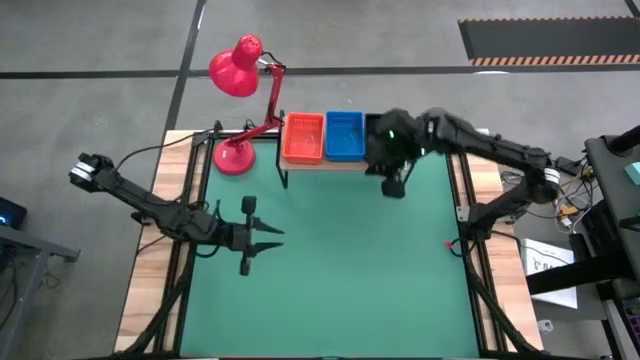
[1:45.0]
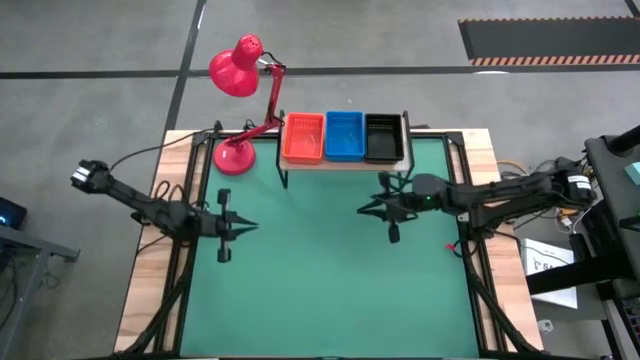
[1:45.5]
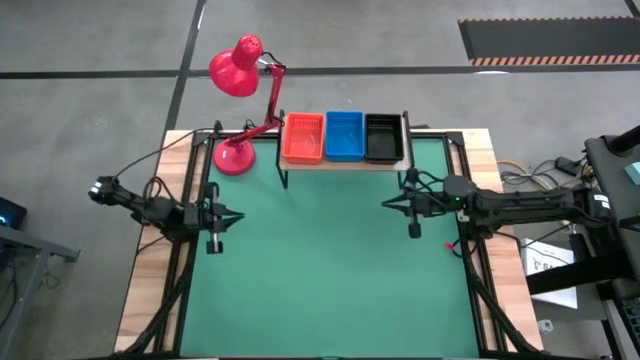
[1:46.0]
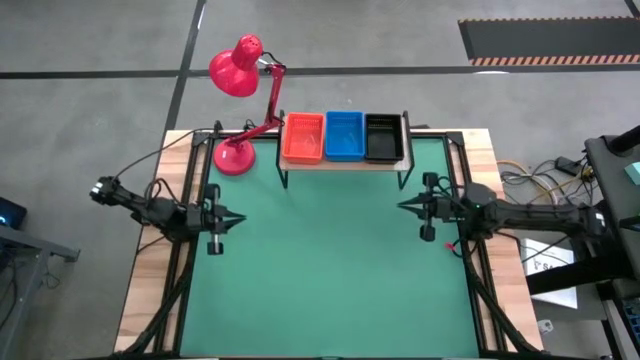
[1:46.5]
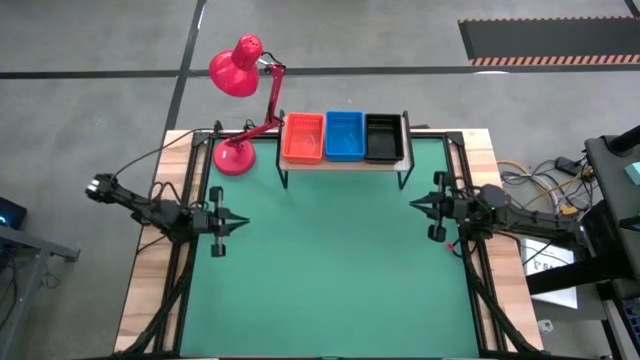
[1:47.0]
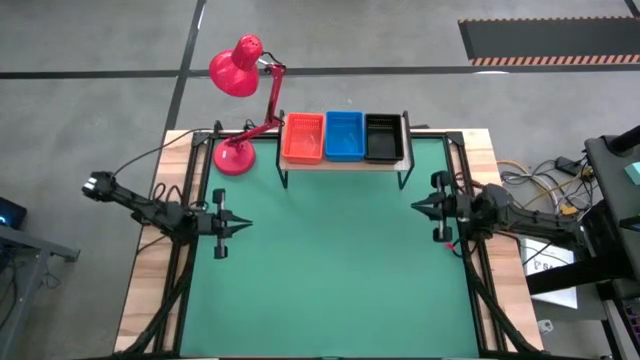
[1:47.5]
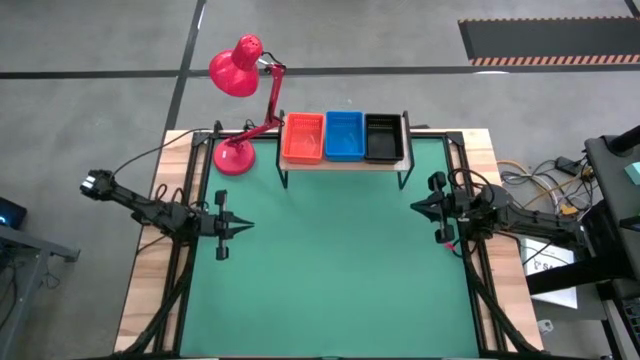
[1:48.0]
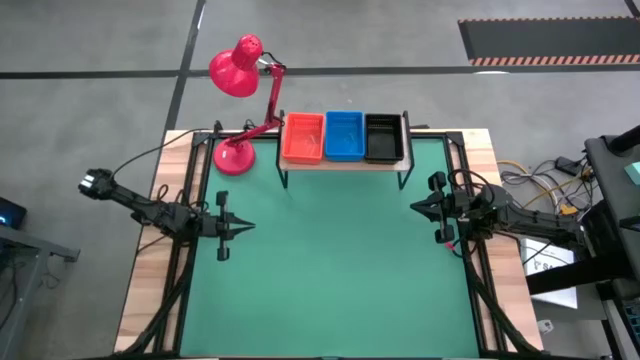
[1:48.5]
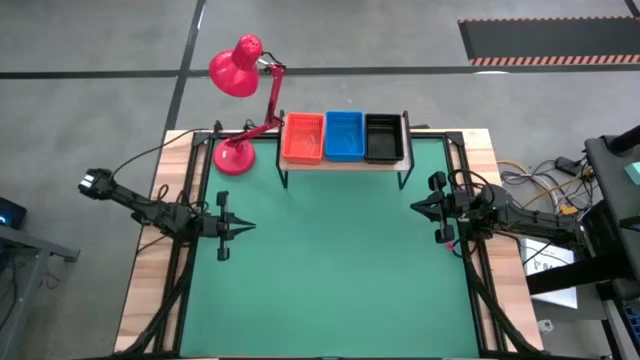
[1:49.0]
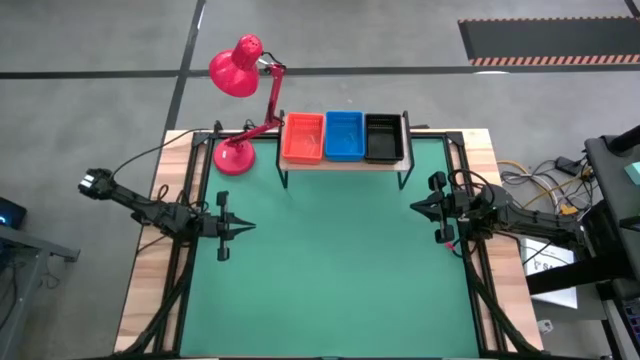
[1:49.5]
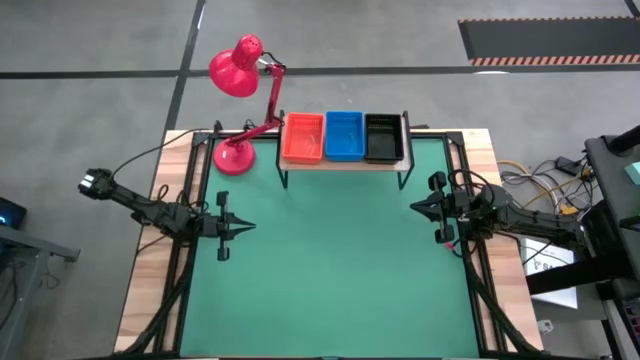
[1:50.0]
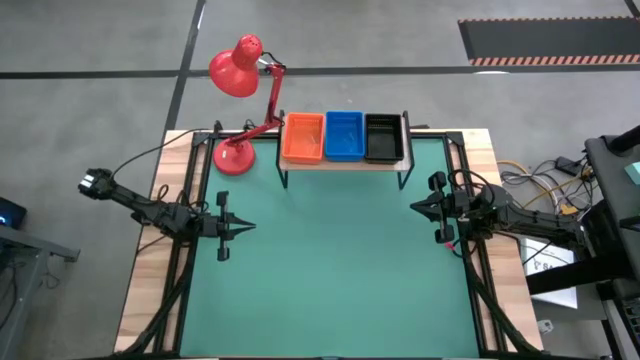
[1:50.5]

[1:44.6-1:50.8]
Task: Stack baskets on shelf by color
Return to Home Position

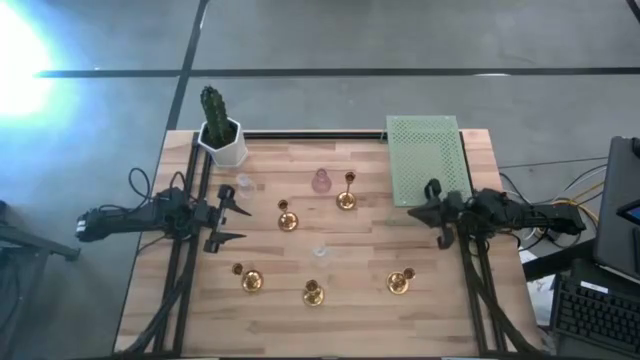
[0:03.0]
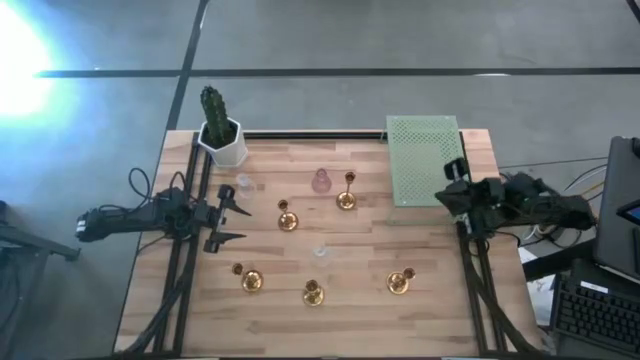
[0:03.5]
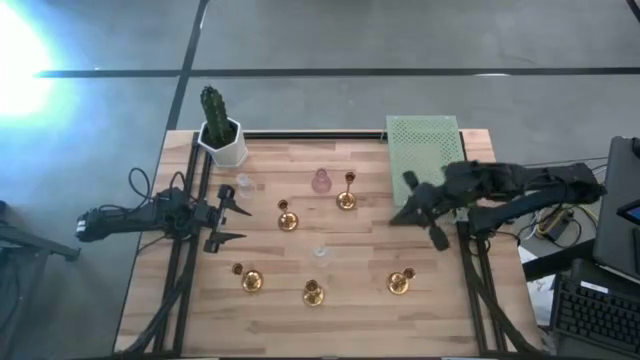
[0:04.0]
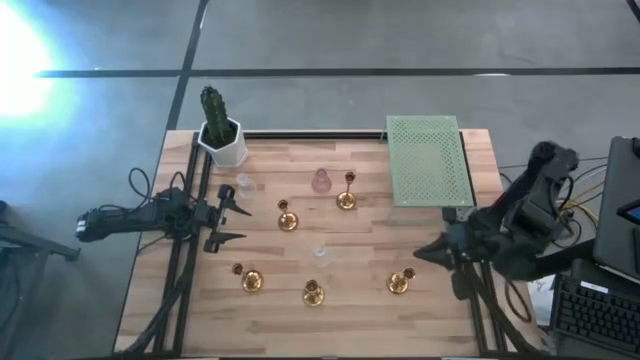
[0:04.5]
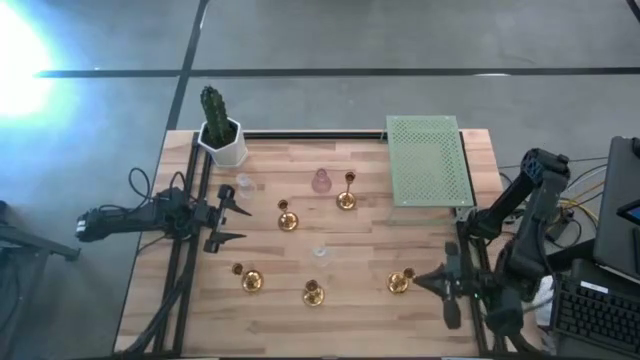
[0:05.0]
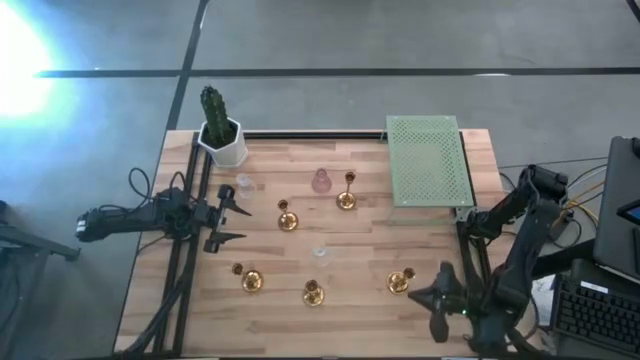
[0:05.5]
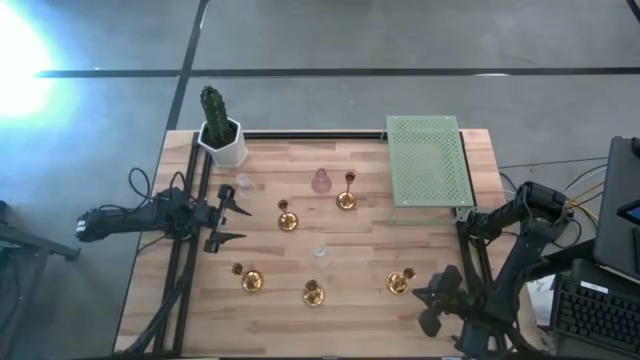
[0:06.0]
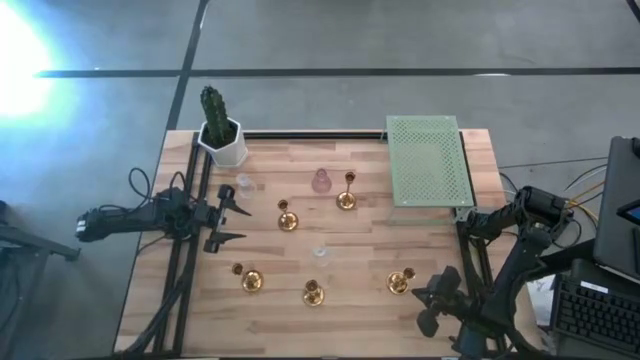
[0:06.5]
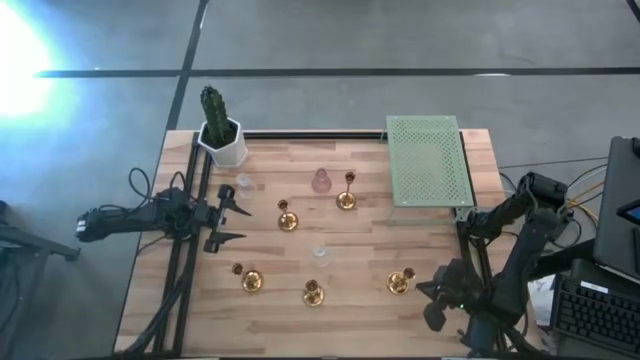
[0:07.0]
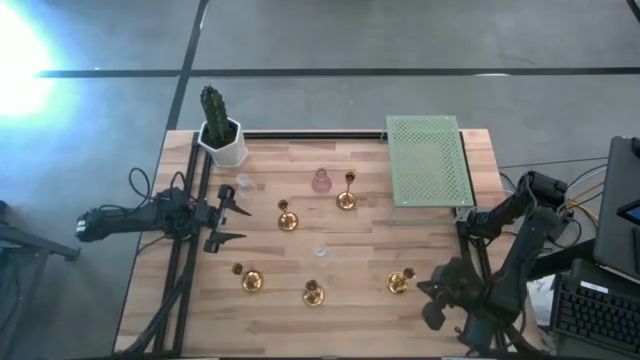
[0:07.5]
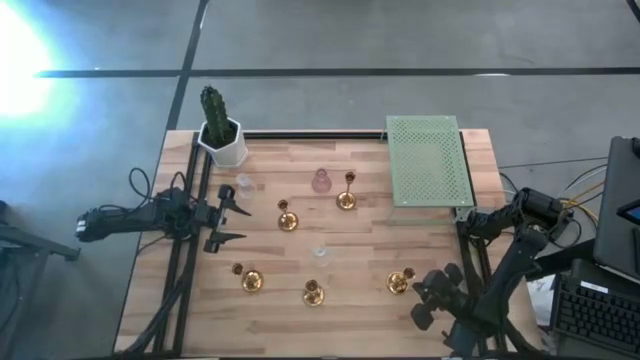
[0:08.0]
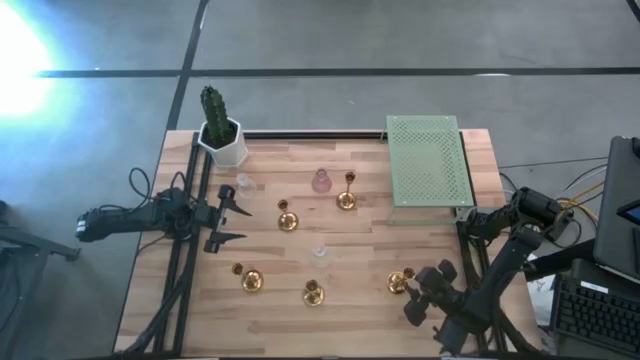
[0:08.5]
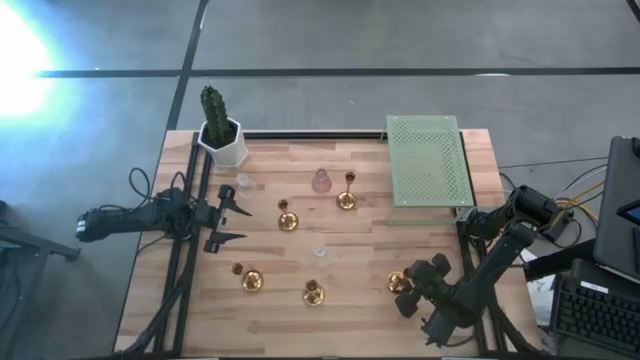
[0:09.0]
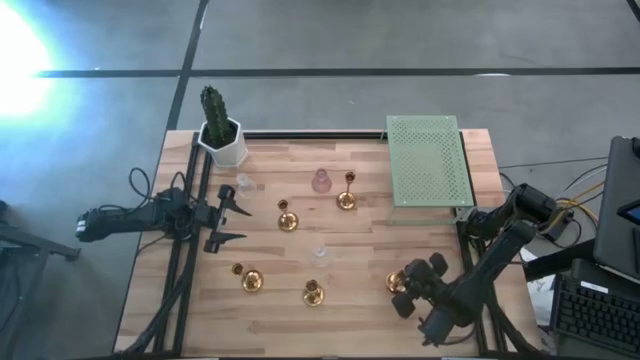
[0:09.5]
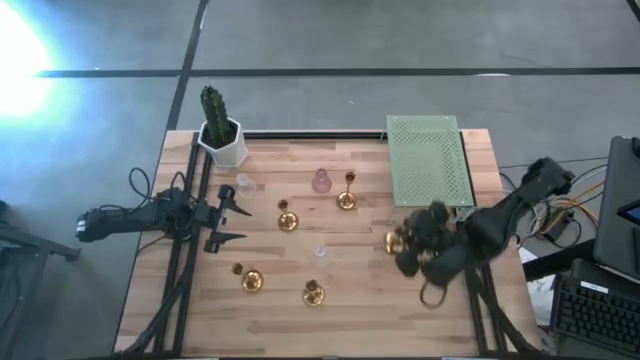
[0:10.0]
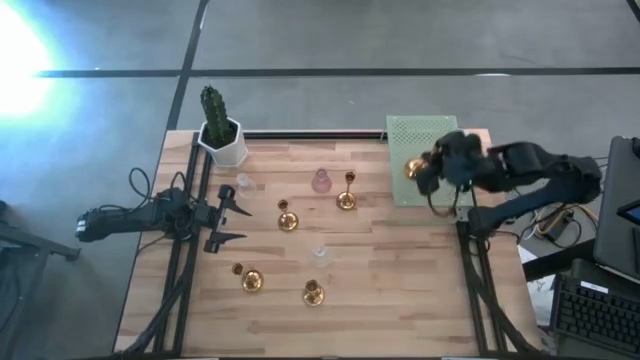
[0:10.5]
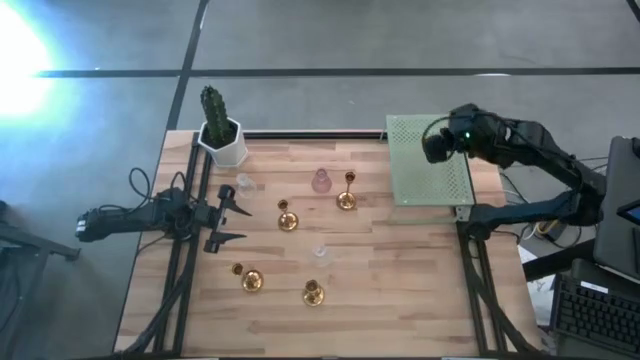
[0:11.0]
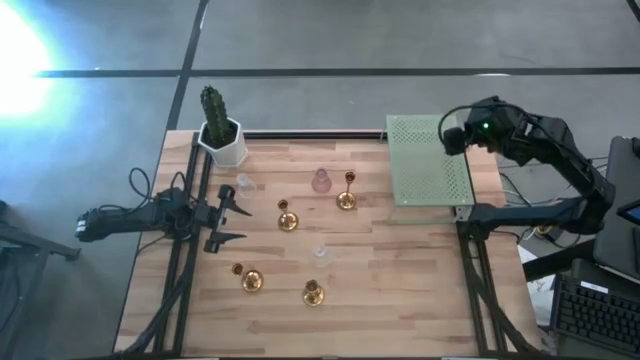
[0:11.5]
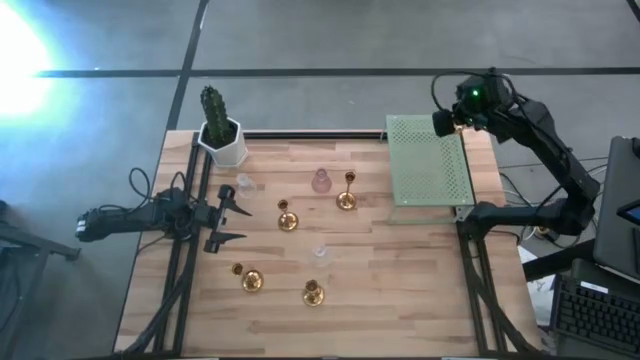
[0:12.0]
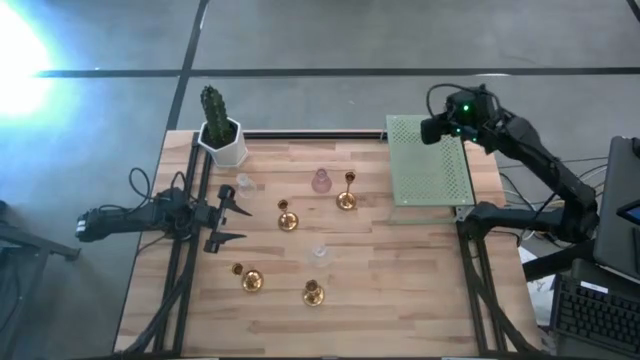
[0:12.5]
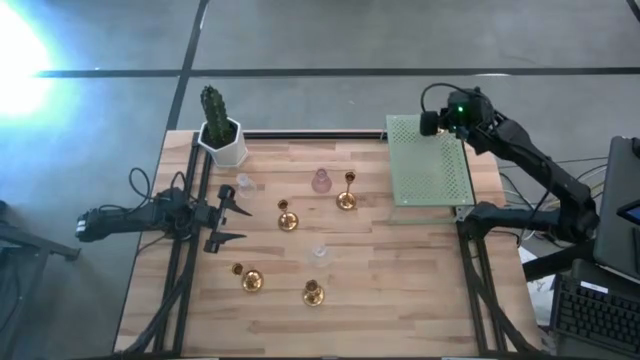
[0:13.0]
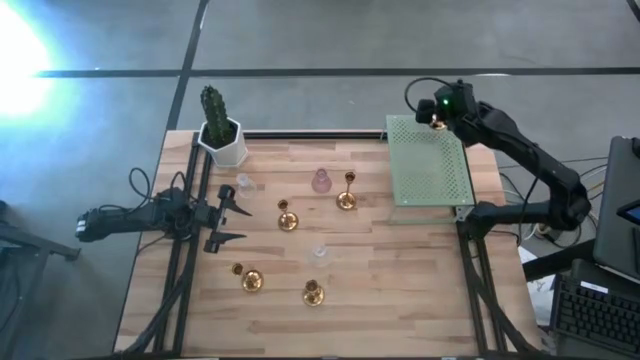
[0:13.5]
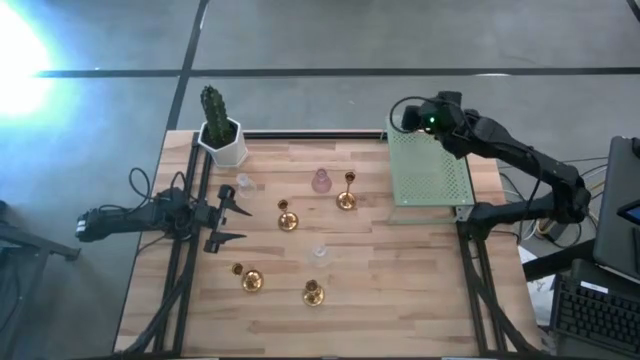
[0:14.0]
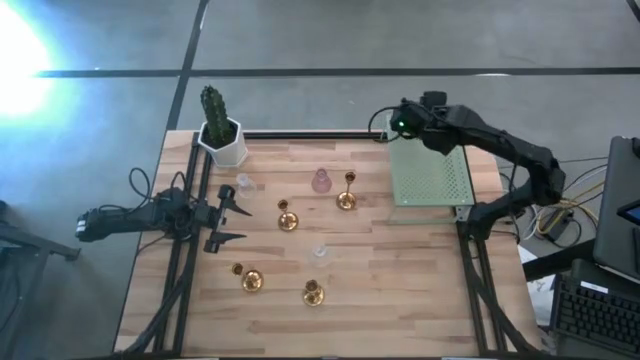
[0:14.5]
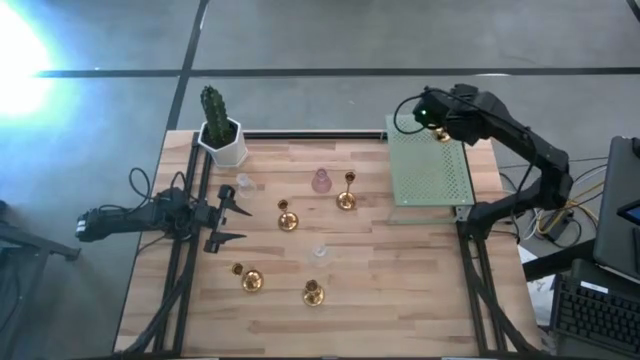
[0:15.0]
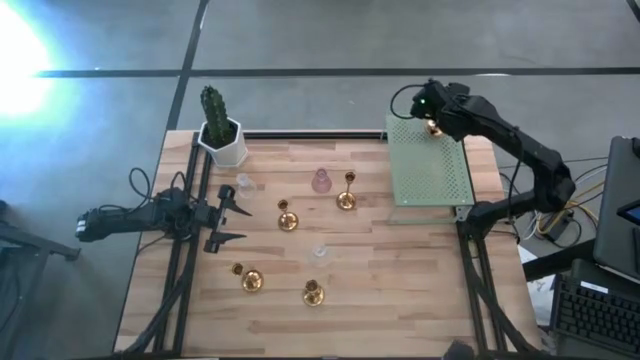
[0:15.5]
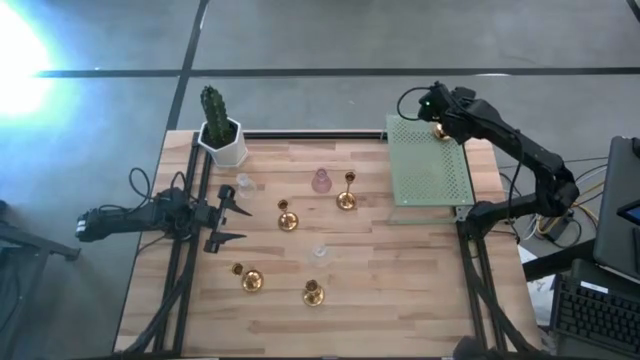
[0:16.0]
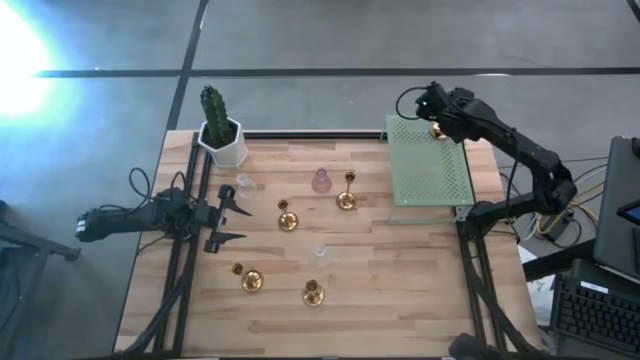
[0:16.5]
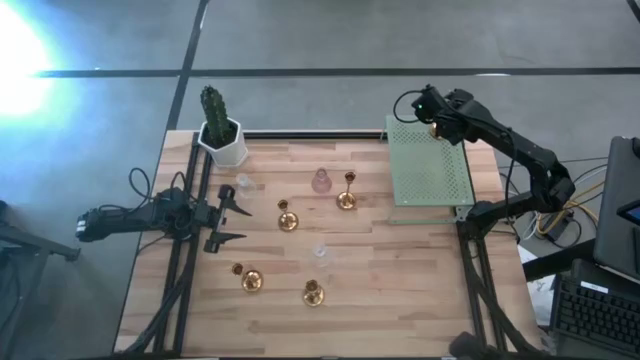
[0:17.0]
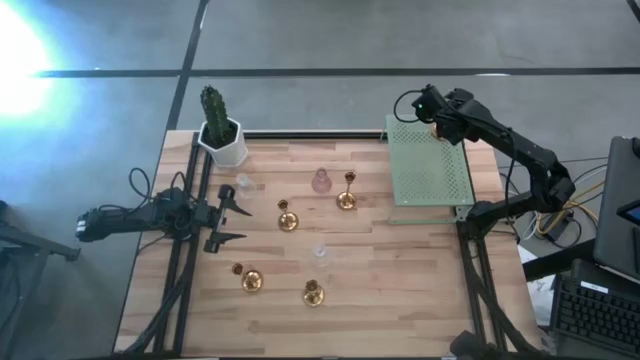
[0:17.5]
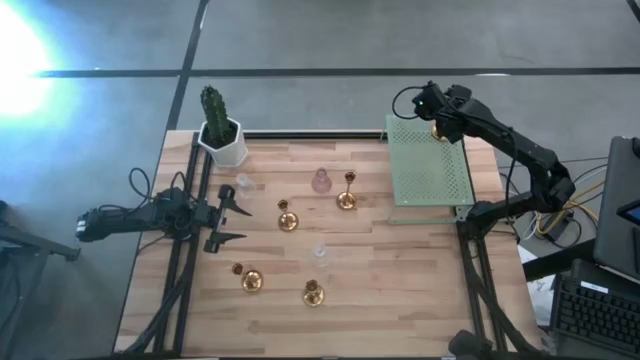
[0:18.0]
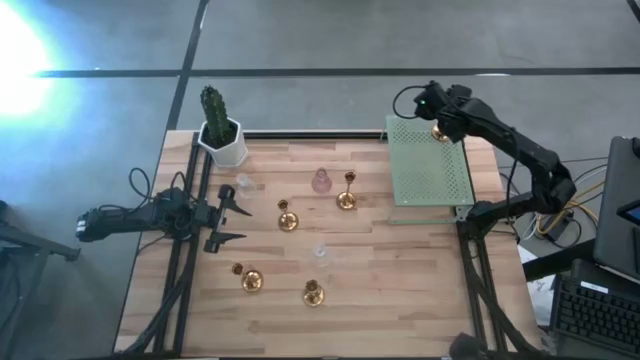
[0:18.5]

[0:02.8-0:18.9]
Task: Pick & Place candle stick holders
Put the gold candle holder on the shelf
